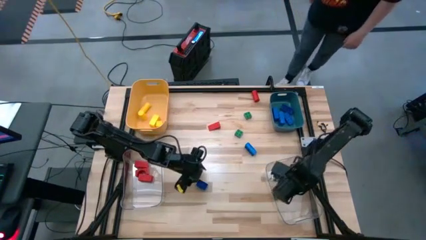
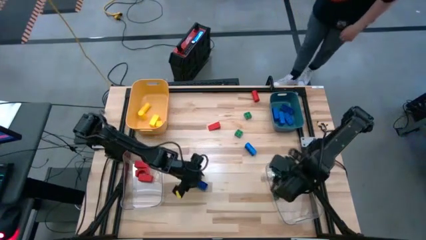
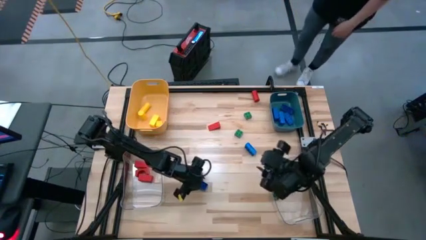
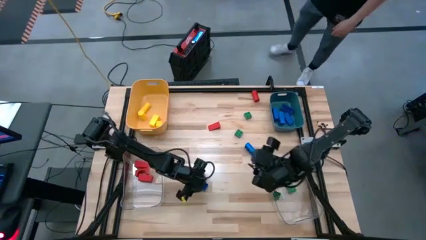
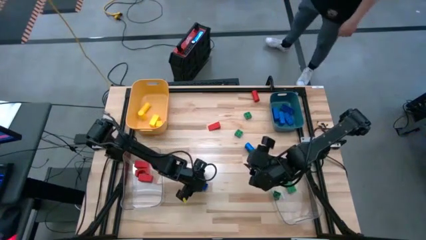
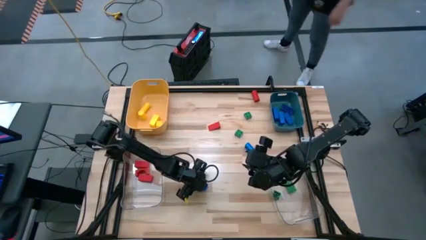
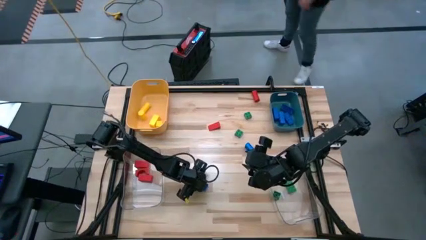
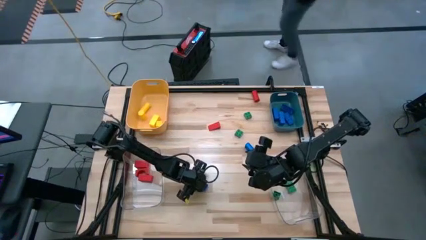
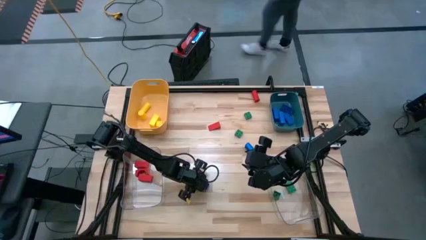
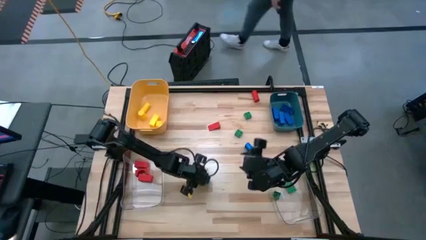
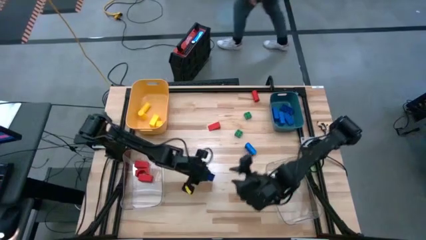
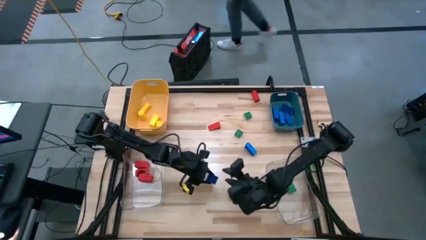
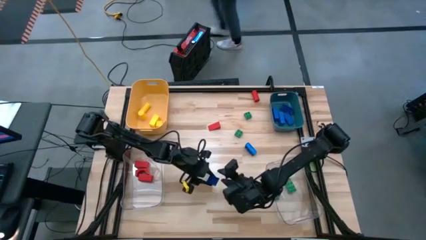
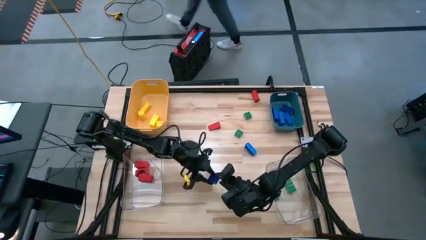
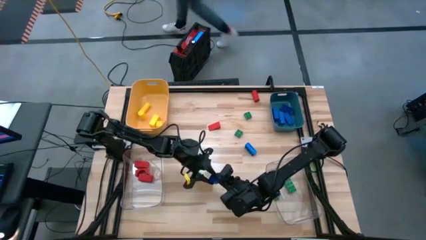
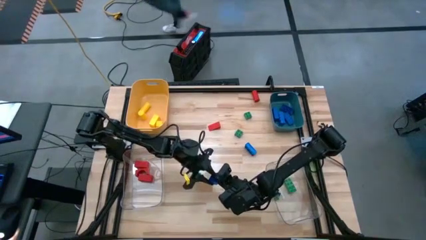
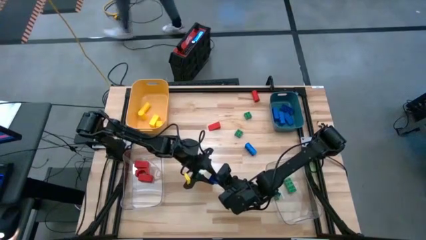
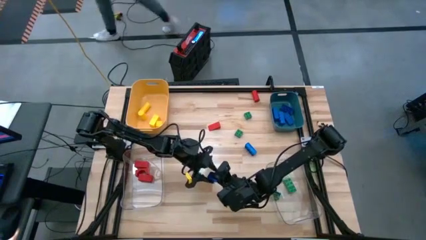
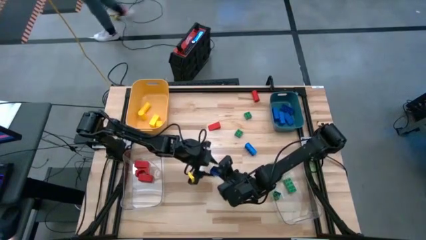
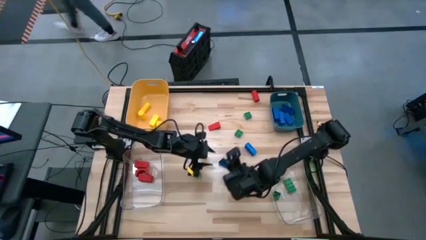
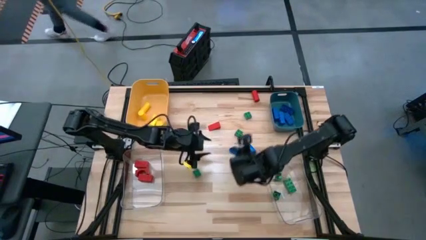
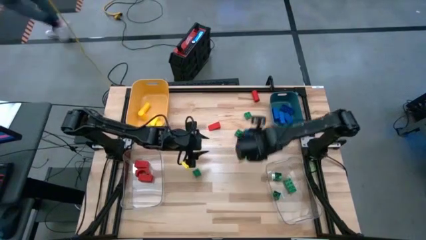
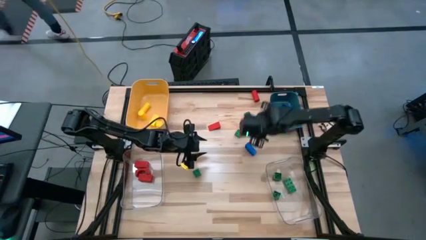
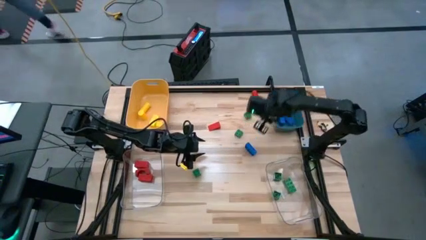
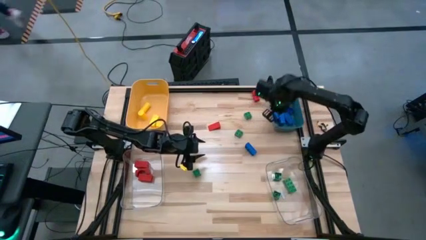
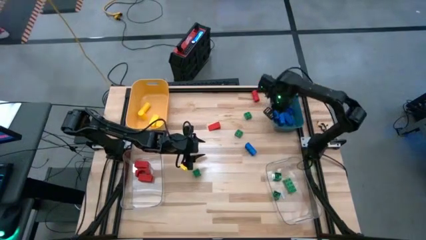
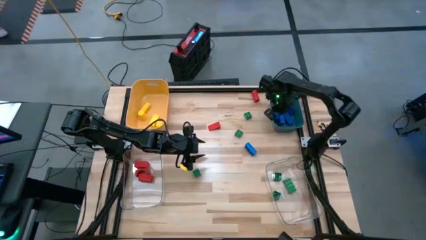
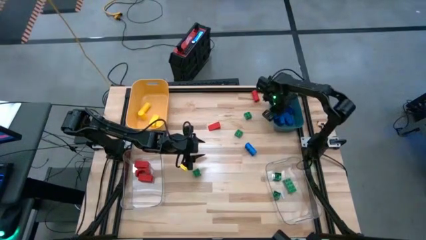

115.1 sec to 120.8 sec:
Task: Sort blocks
Put the blue game piece into the blue bin

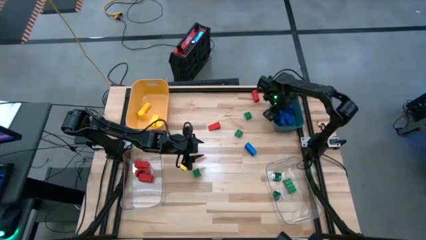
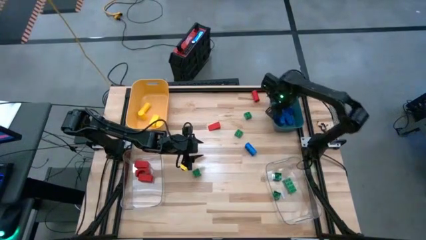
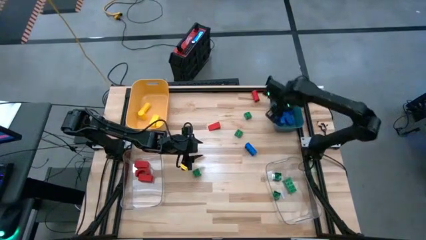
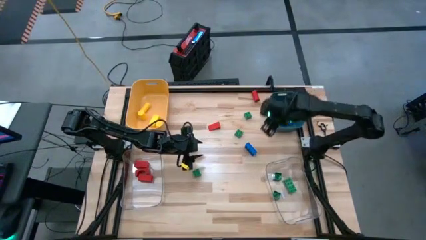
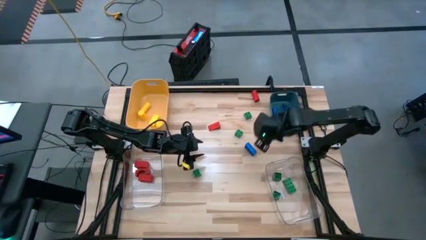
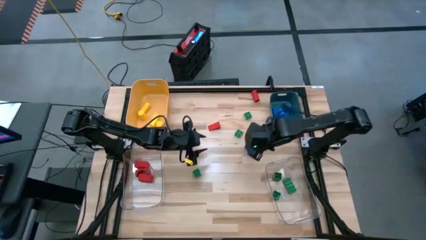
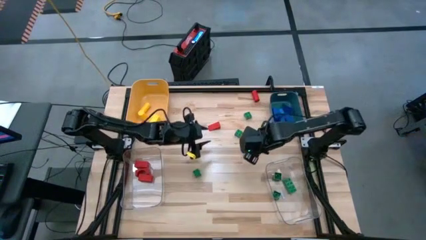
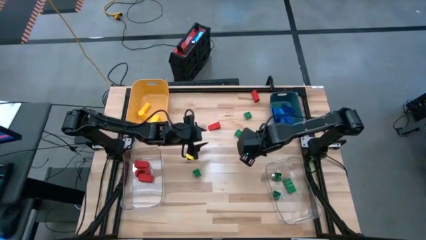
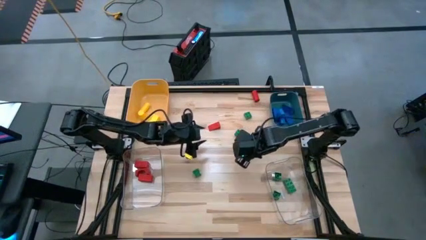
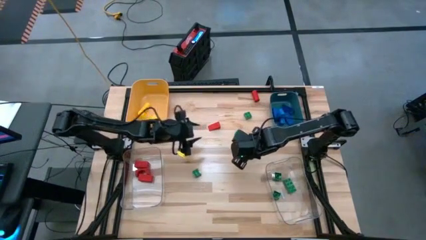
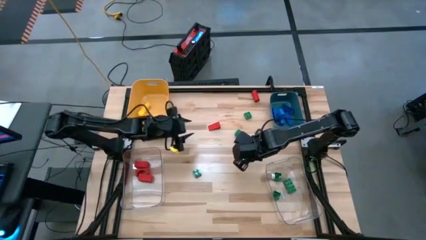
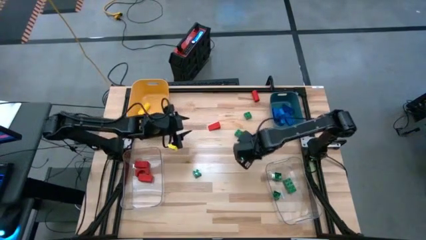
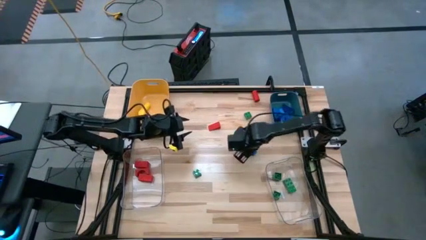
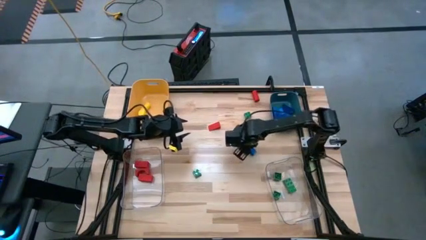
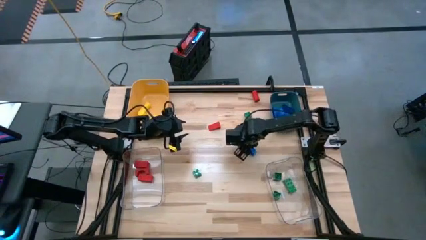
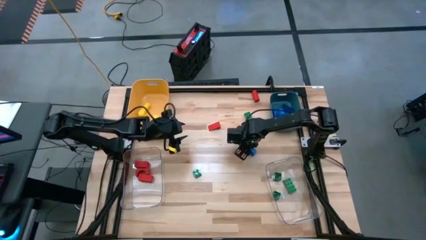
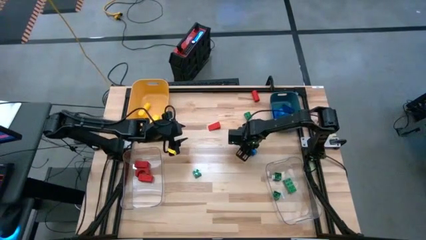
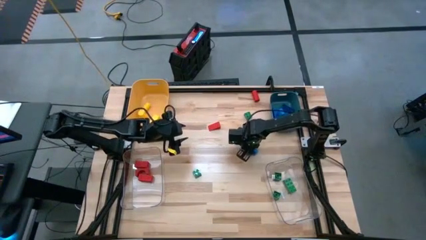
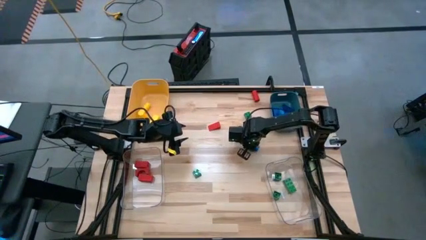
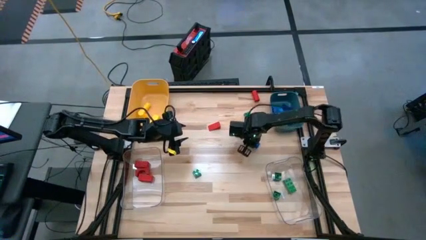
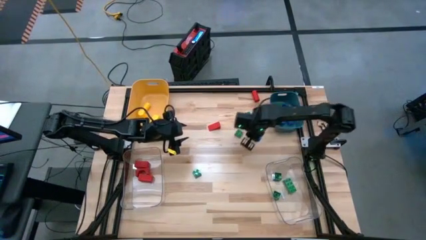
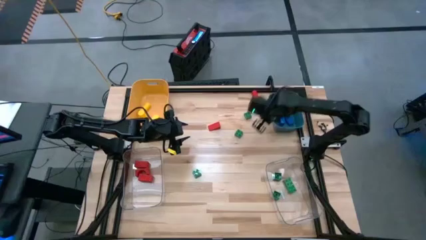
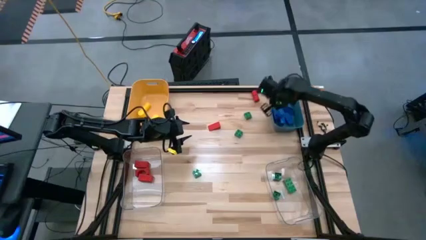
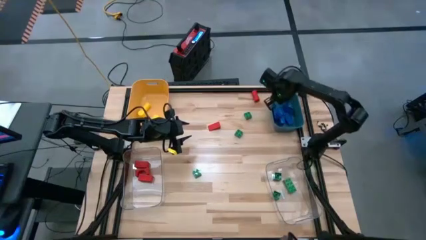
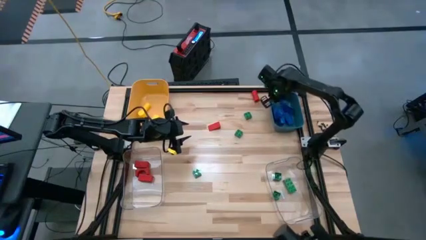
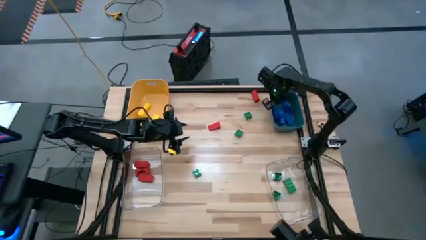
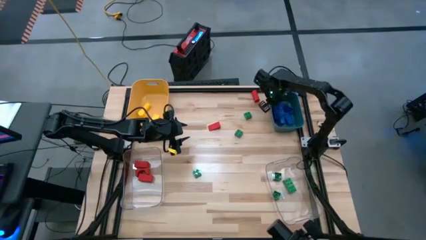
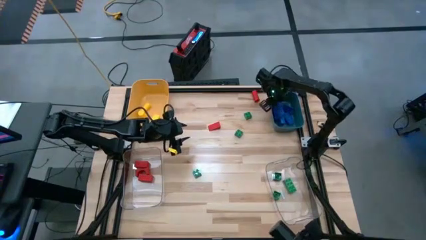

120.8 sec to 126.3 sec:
Put the blue game piece into the blue bin

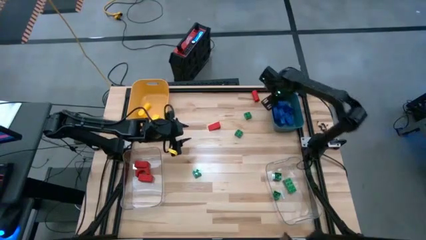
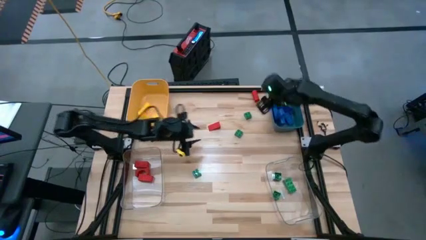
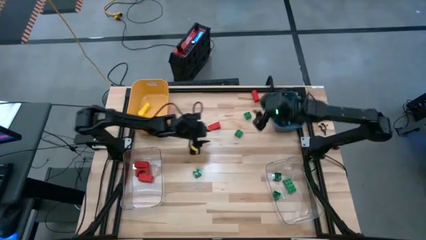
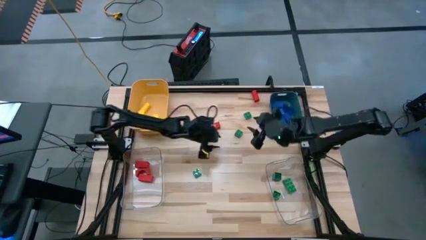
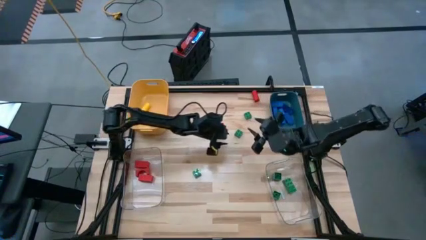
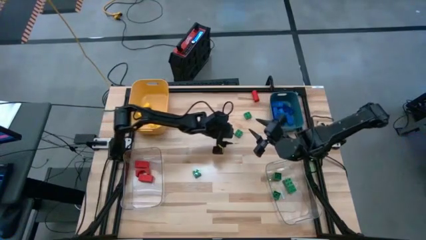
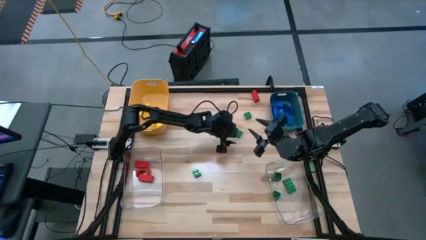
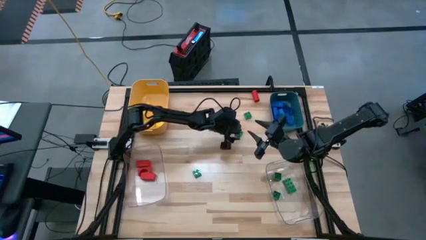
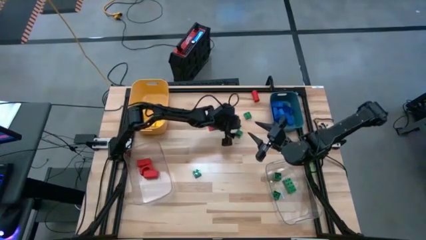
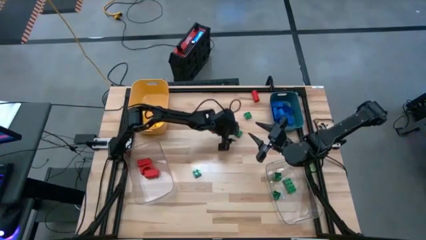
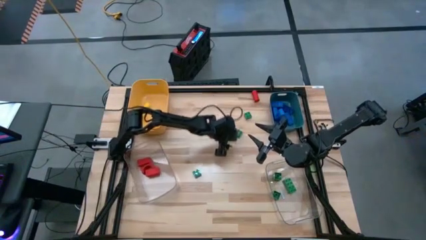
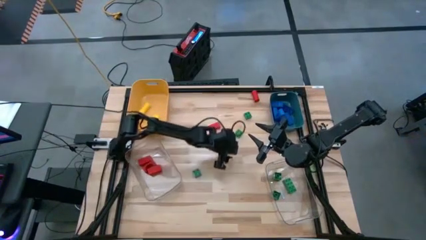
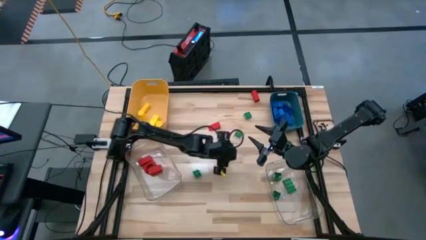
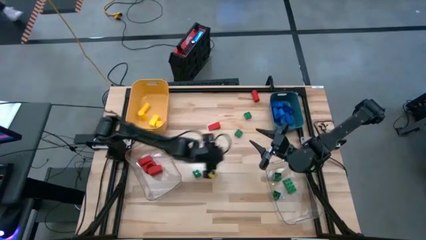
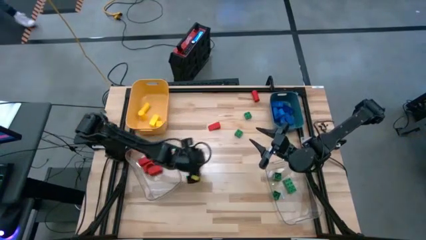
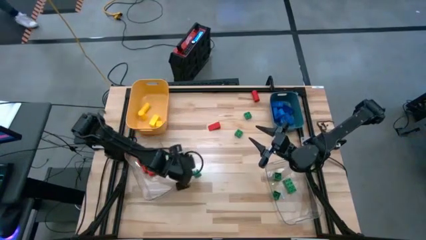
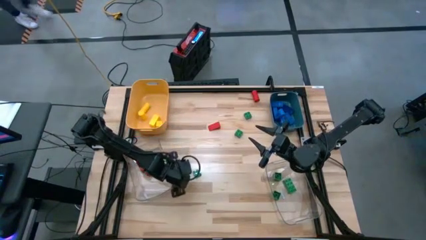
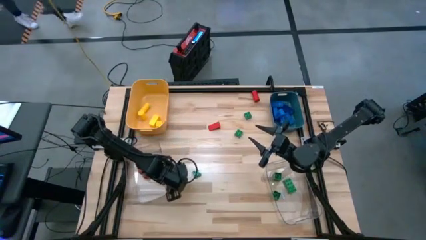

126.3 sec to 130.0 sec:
Adjust the left transparent bin
